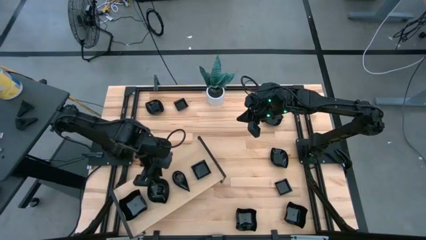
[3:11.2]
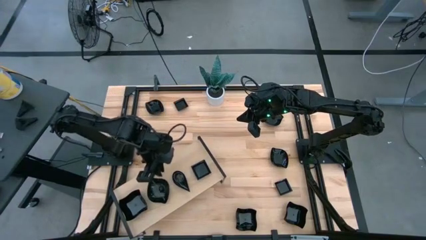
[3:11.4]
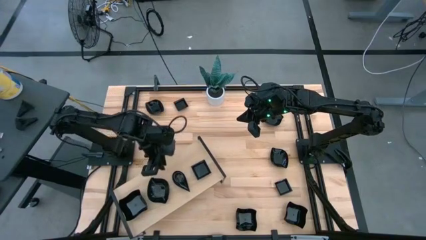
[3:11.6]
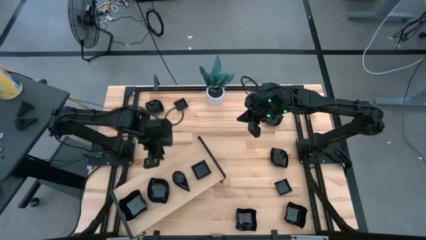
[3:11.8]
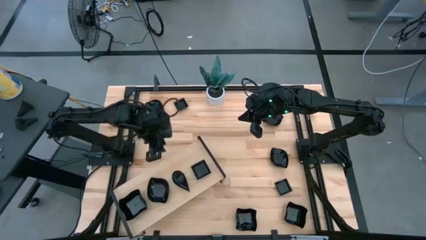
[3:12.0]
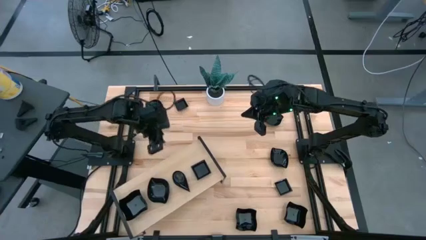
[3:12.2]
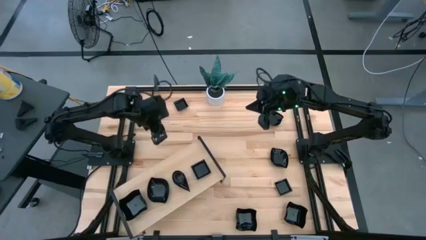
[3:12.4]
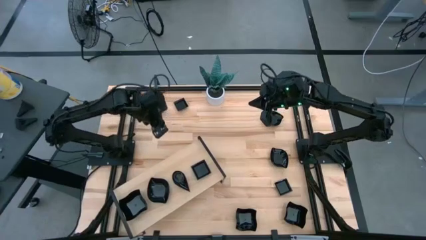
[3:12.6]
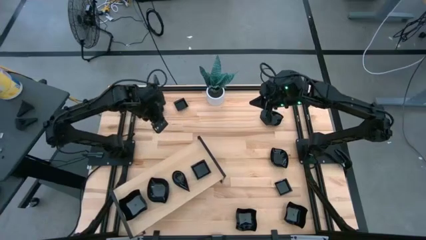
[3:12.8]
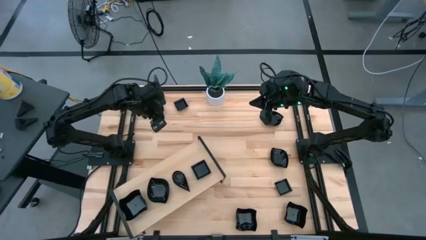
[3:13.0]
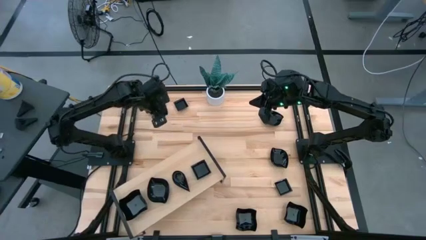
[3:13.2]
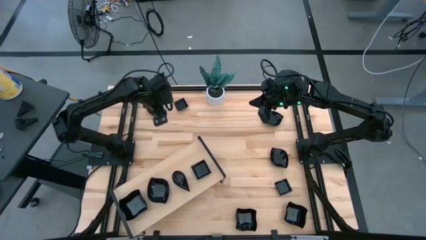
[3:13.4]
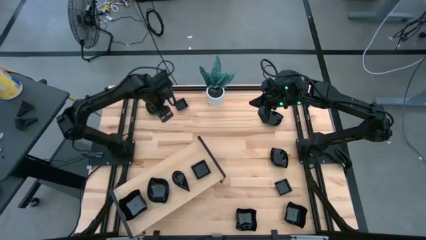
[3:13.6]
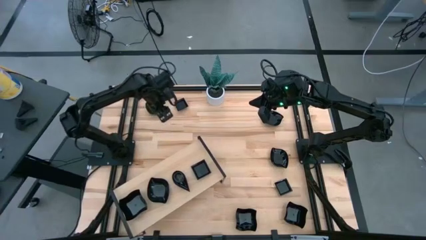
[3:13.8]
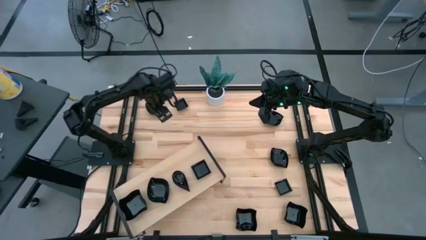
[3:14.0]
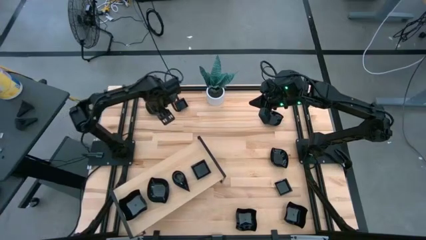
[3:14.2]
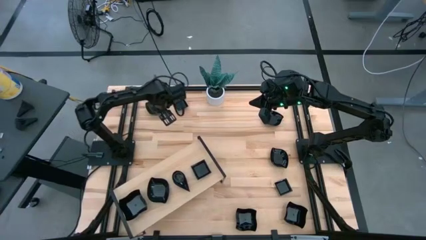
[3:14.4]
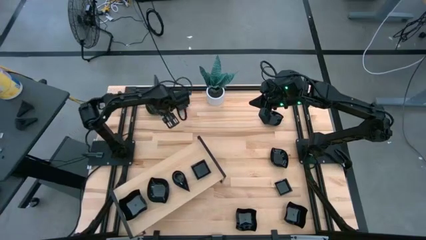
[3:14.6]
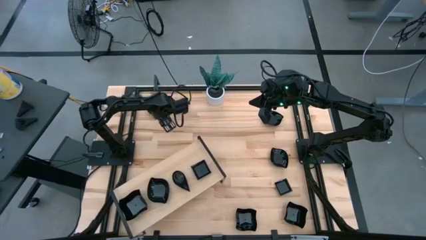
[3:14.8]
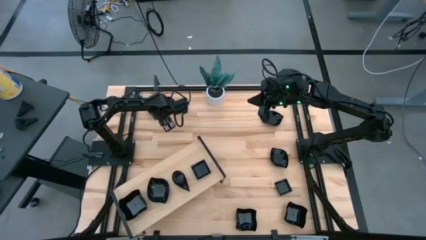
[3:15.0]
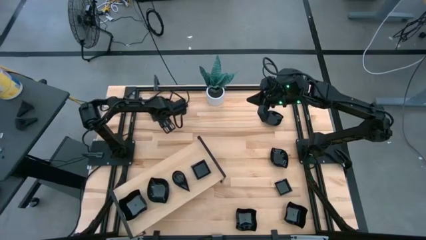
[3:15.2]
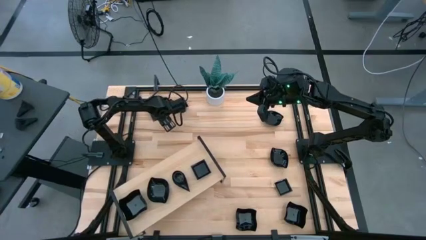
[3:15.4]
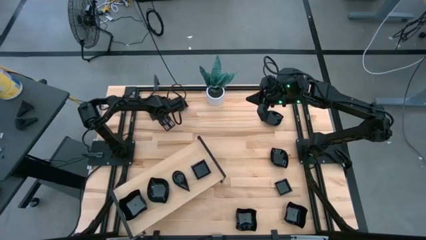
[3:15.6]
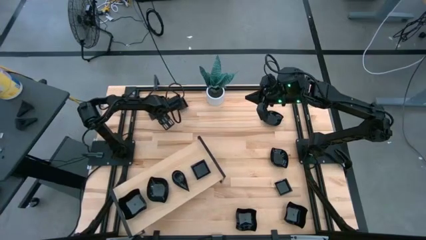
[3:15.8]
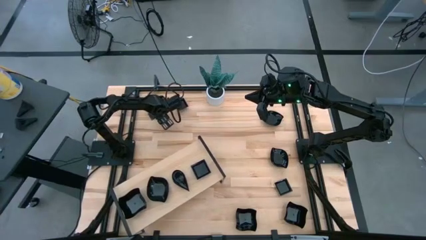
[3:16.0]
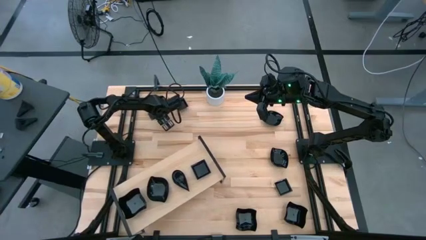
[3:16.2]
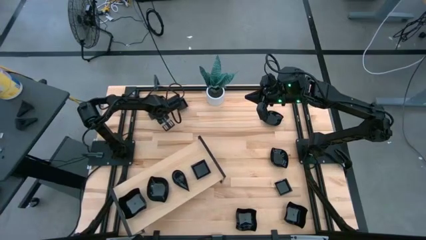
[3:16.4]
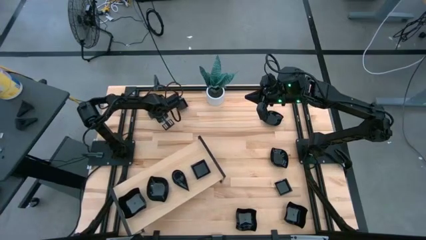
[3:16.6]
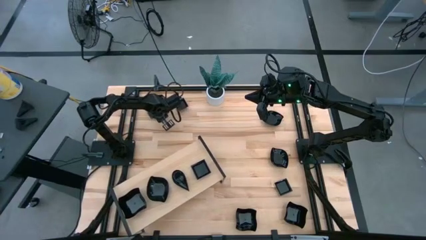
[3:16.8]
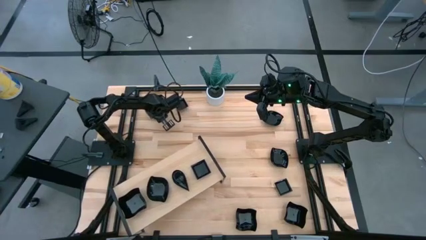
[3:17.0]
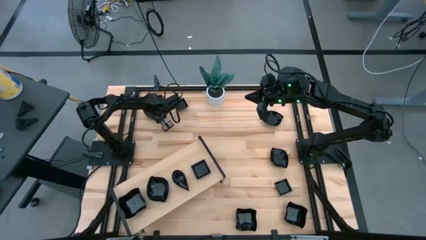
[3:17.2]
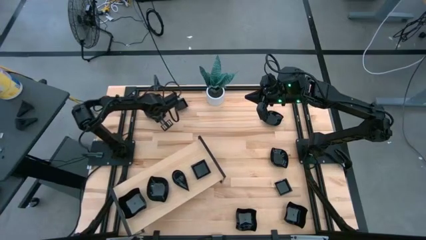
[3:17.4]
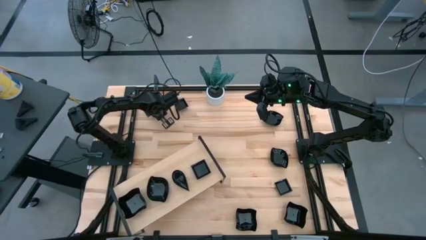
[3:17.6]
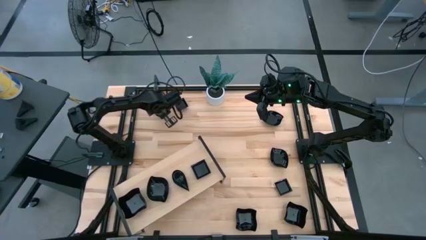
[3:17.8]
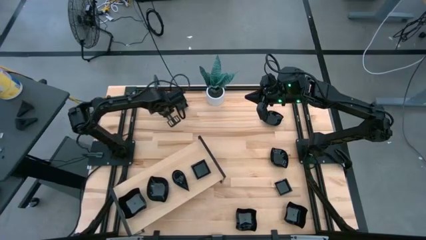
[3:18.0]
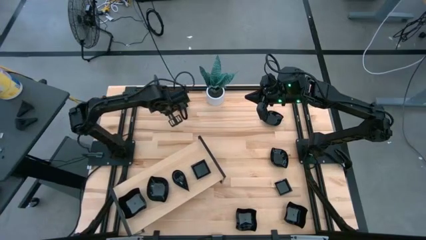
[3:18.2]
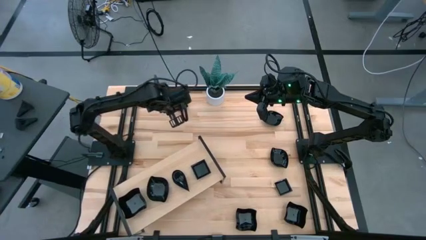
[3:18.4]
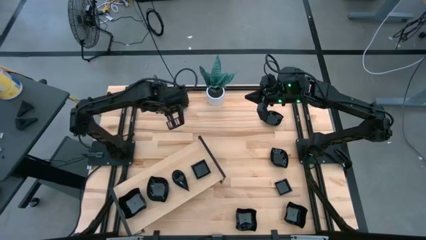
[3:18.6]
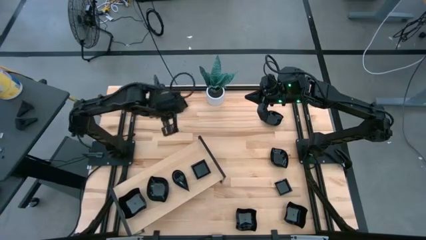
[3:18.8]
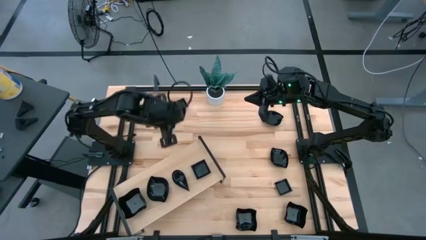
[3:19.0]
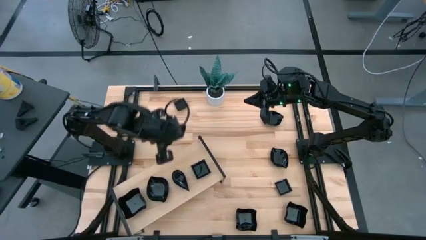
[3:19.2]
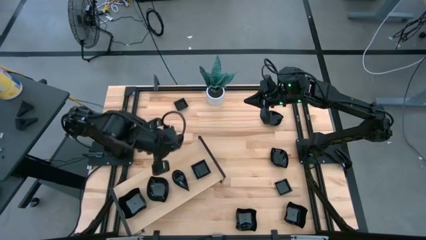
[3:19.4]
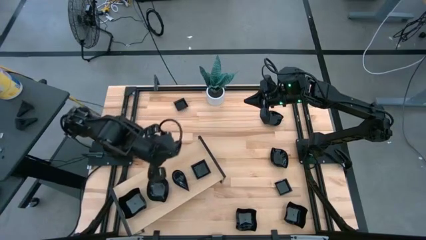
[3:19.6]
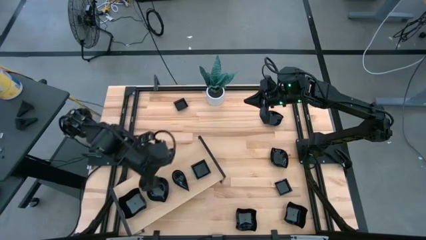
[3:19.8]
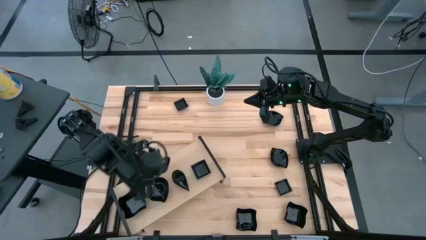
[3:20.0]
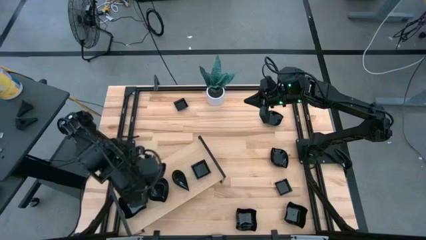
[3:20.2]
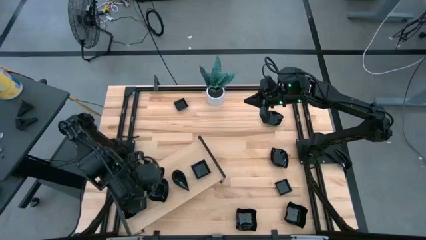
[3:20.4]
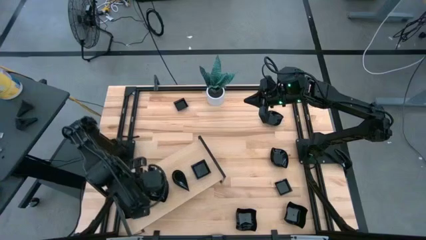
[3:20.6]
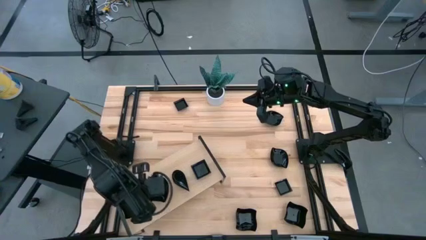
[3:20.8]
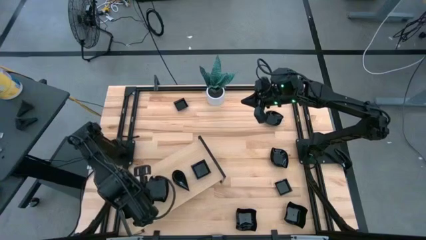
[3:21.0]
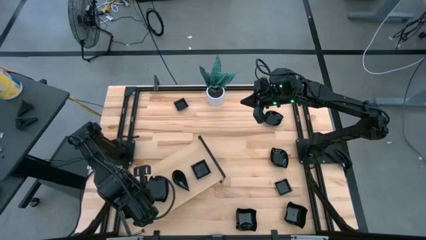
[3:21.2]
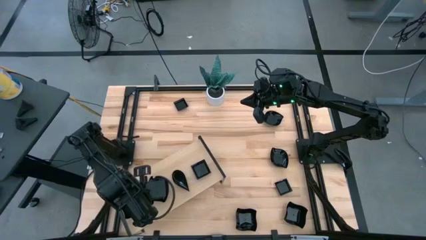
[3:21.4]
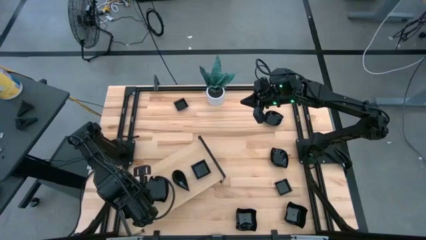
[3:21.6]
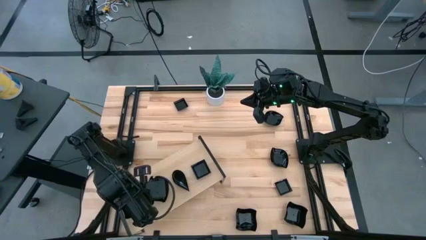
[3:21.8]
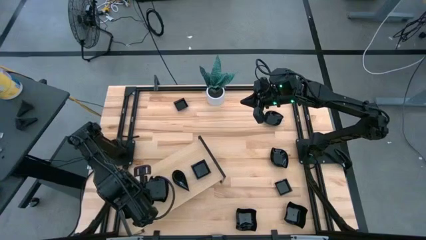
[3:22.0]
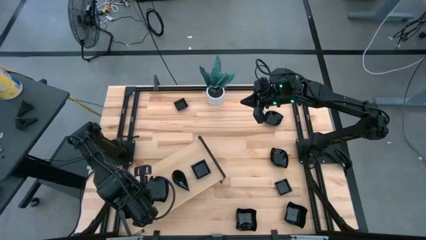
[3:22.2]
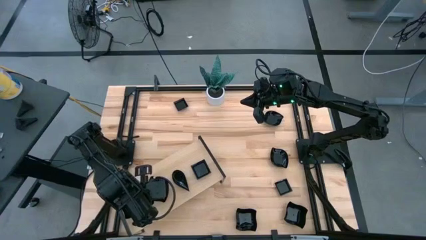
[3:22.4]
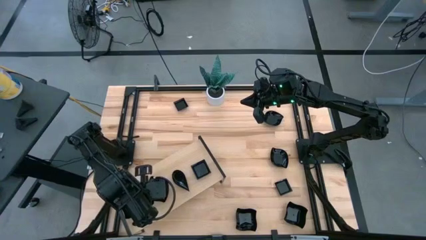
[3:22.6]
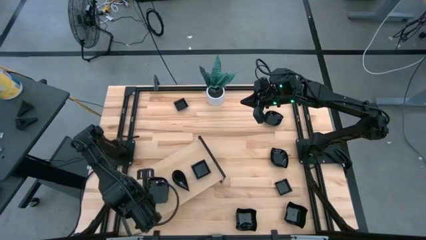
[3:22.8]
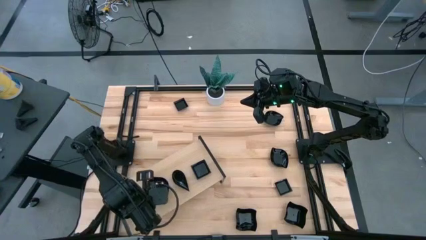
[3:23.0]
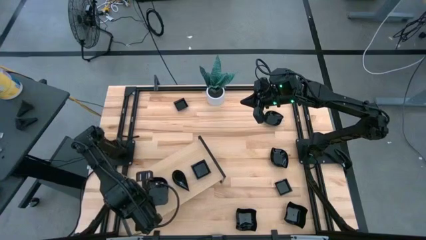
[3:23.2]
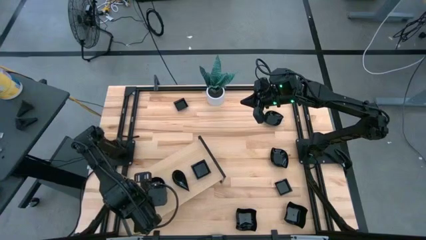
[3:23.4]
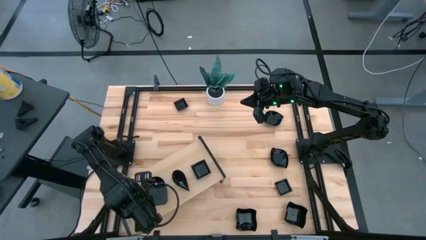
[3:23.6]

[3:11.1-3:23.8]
Task: Pick & Place Mini shaped plates
Stack the black leaf shaped plate on top of the black leaf shaped plate on the shelf

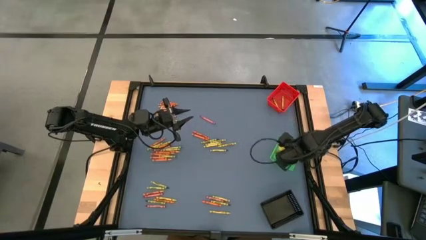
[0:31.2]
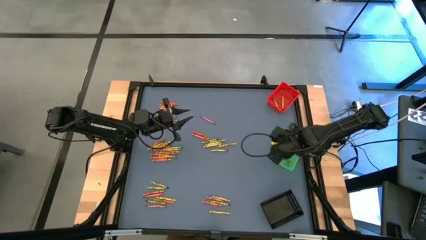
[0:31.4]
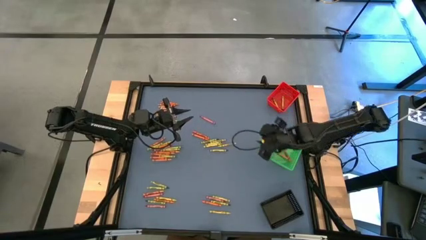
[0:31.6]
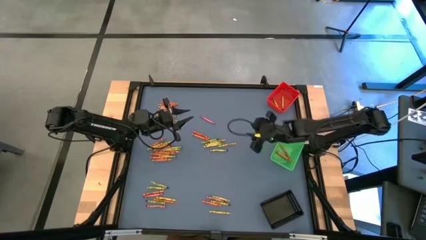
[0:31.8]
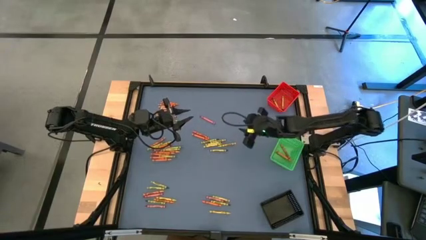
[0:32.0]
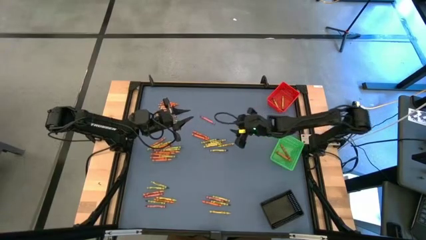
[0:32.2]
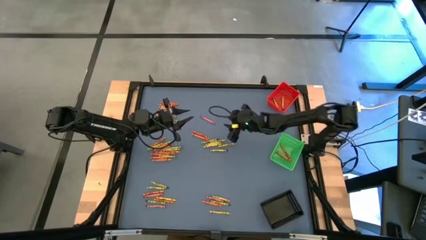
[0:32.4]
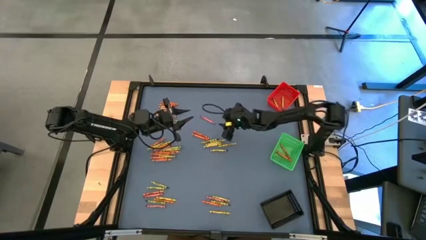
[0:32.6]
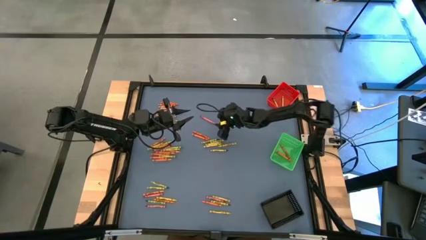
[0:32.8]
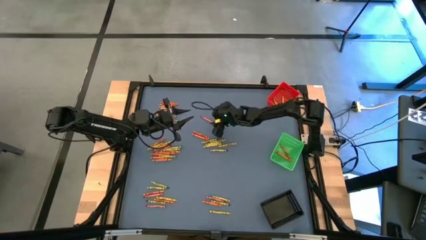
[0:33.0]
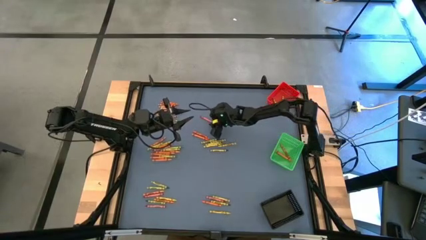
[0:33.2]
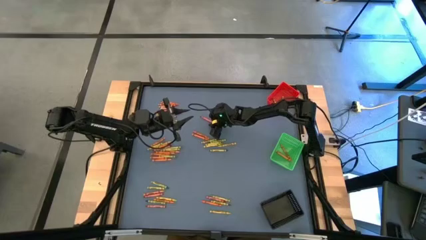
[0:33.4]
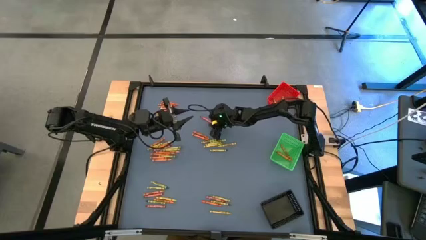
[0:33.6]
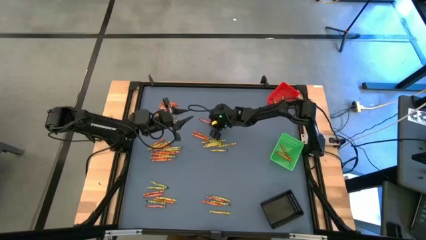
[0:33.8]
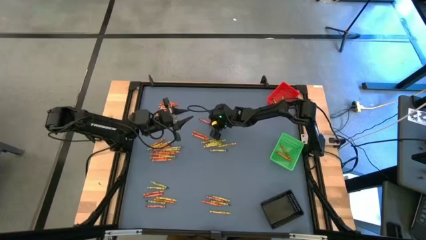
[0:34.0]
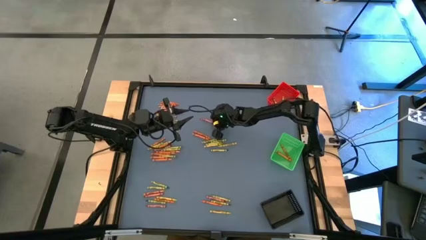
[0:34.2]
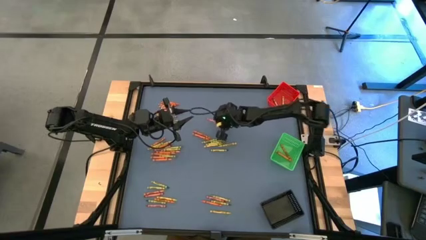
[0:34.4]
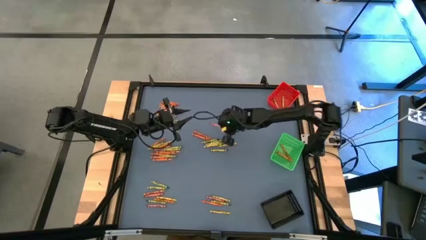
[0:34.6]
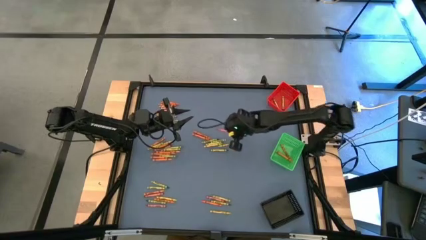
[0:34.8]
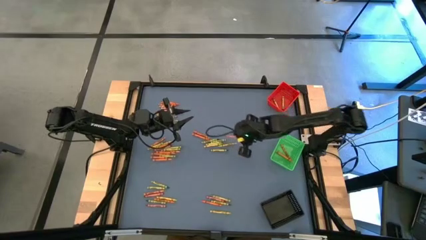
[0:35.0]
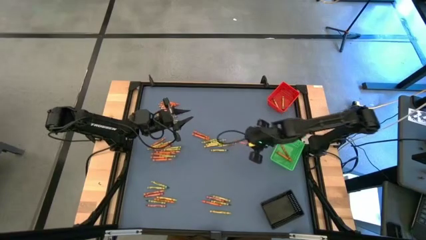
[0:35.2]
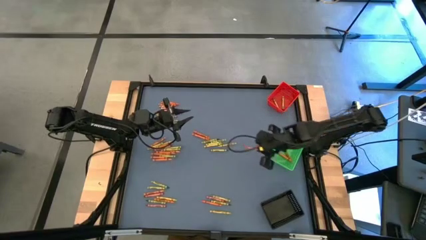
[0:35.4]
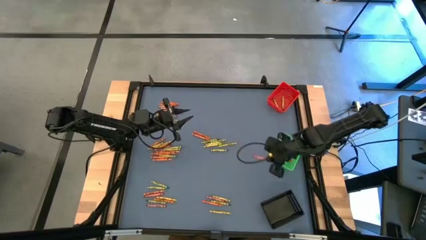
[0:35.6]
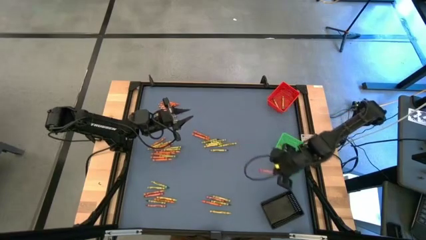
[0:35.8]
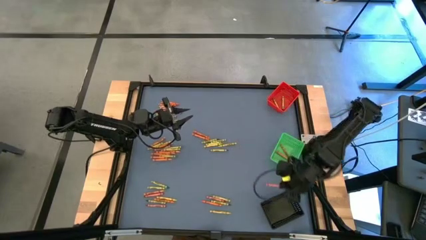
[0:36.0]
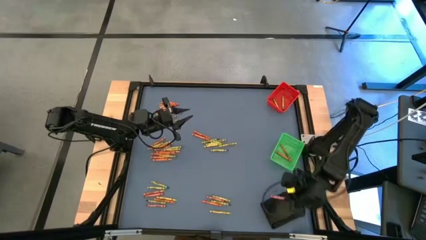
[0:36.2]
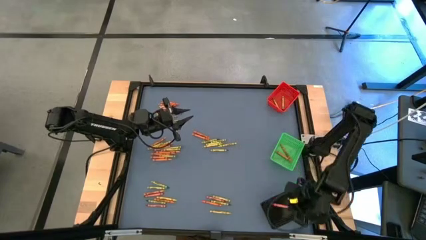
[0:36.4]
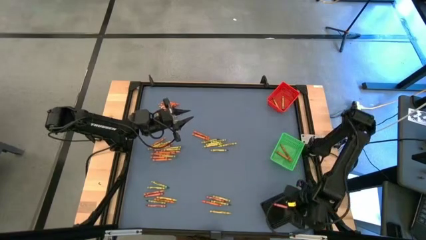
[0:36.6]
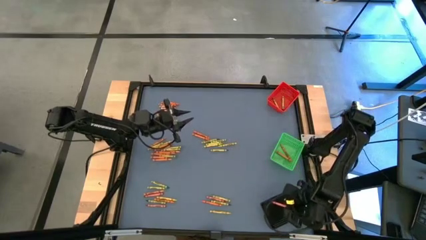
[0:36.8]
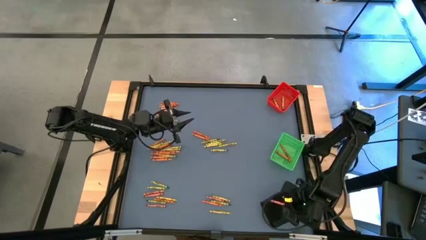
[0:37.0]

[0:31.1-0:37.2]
Task: Sort crayons
Put the red crayon into the black bin
